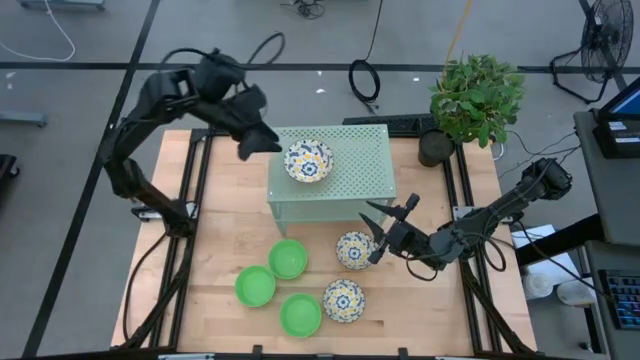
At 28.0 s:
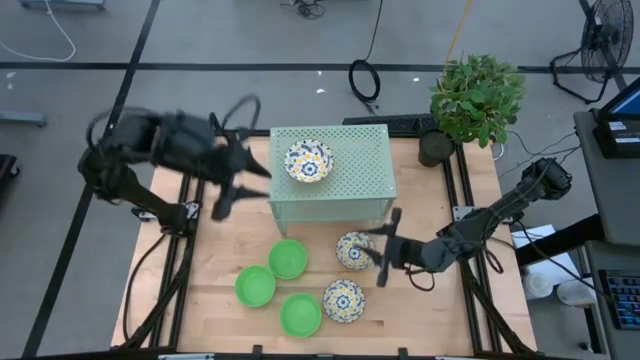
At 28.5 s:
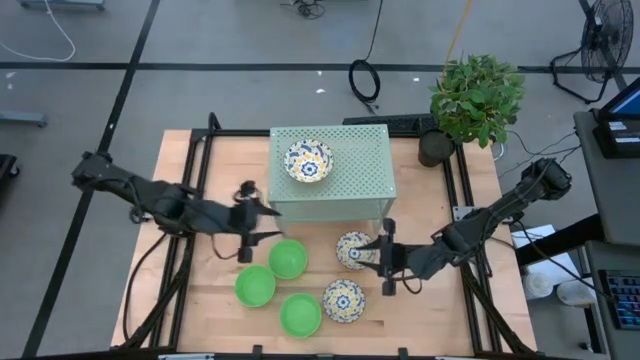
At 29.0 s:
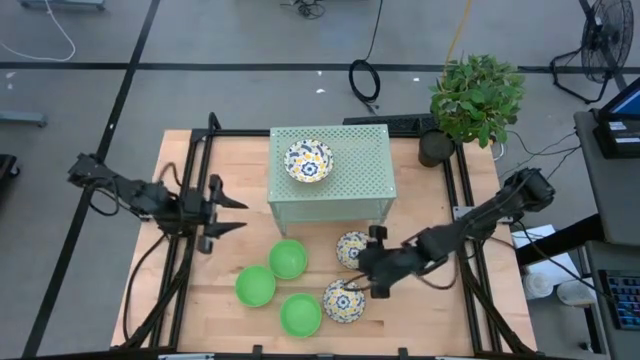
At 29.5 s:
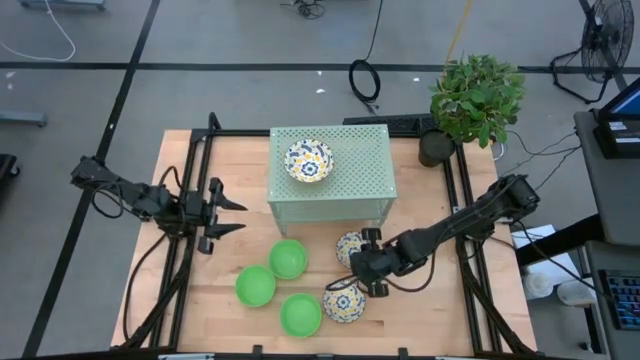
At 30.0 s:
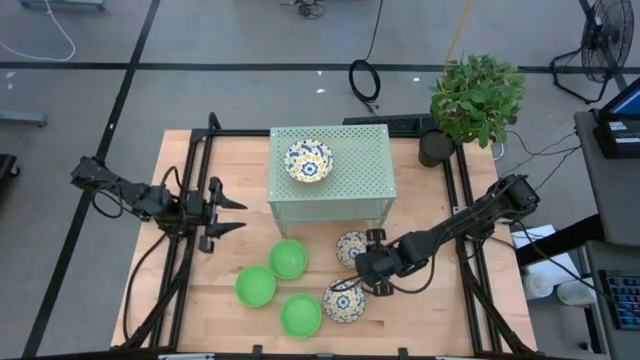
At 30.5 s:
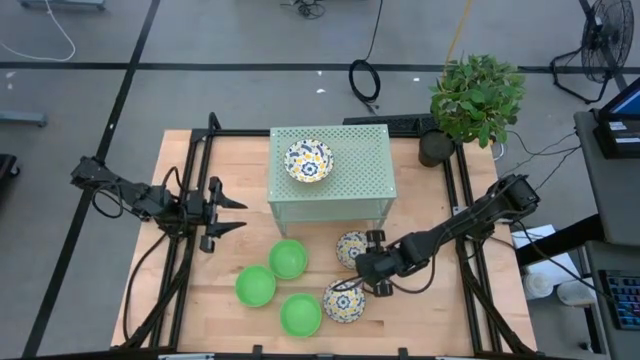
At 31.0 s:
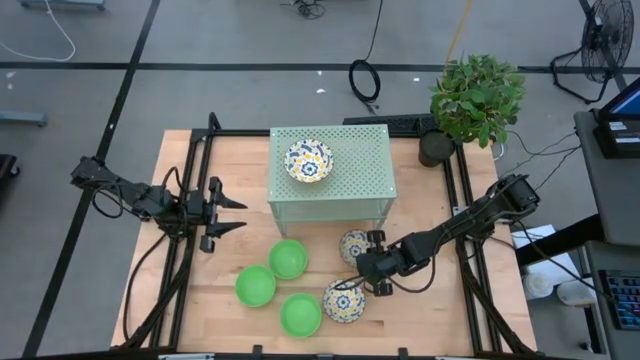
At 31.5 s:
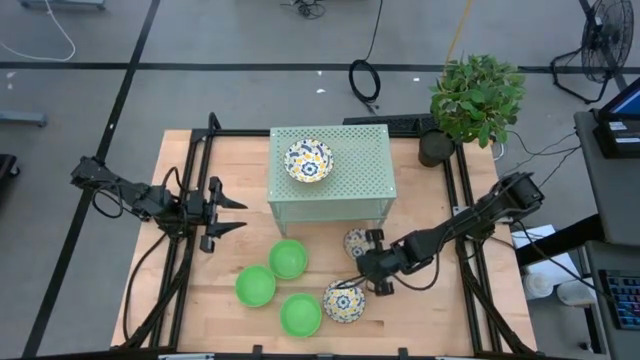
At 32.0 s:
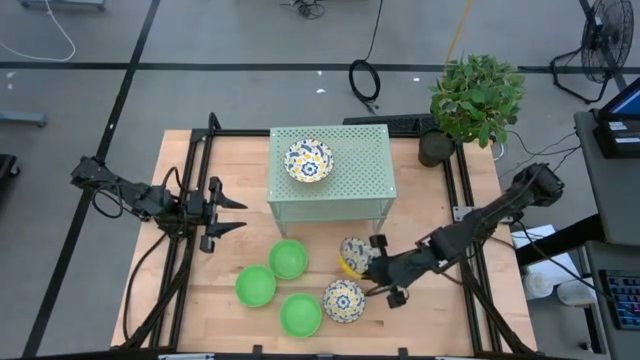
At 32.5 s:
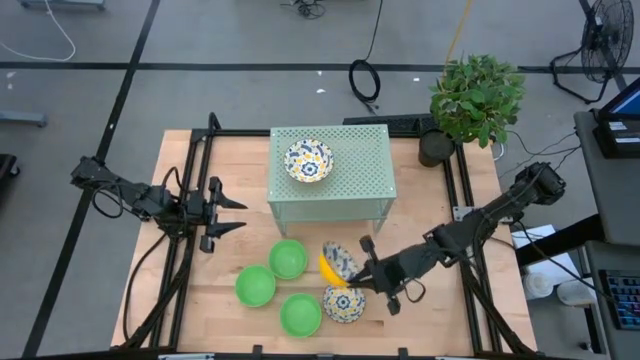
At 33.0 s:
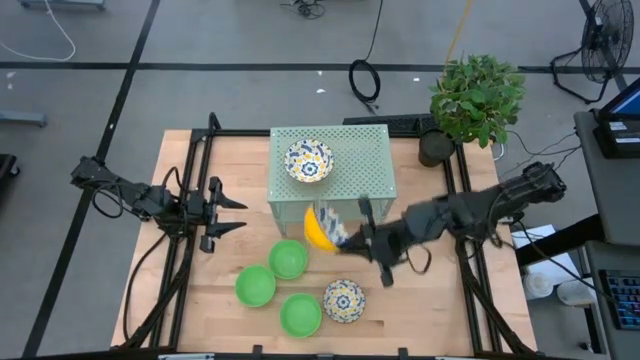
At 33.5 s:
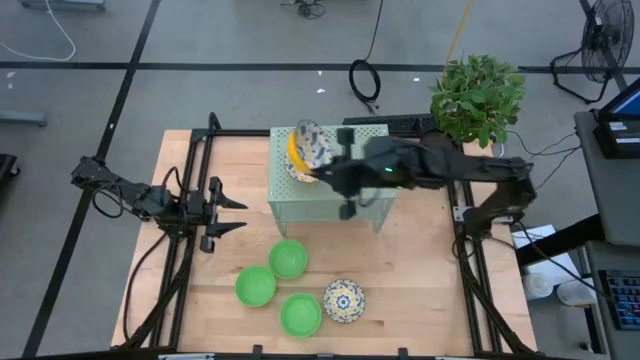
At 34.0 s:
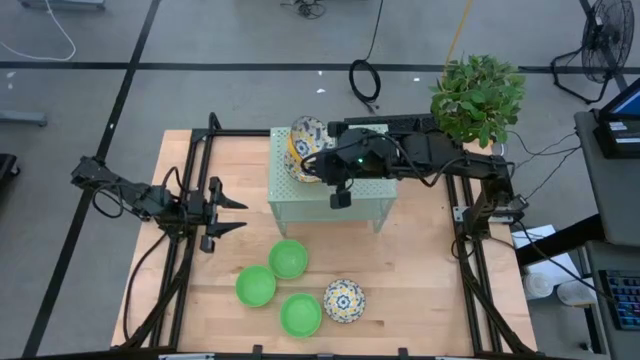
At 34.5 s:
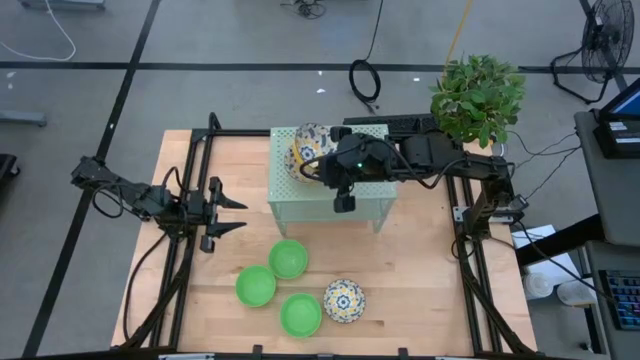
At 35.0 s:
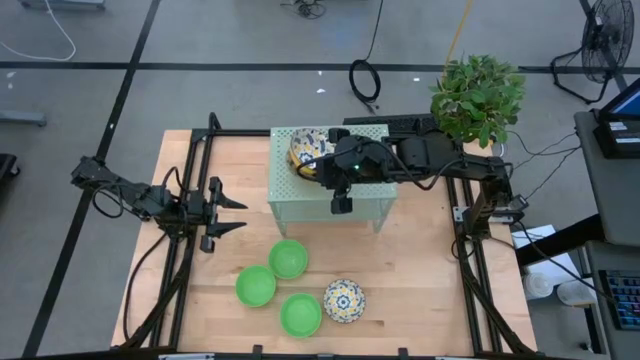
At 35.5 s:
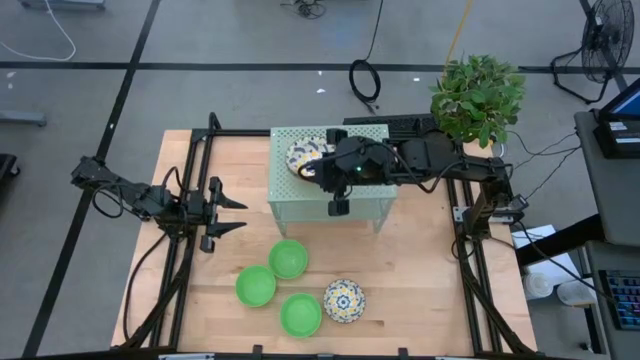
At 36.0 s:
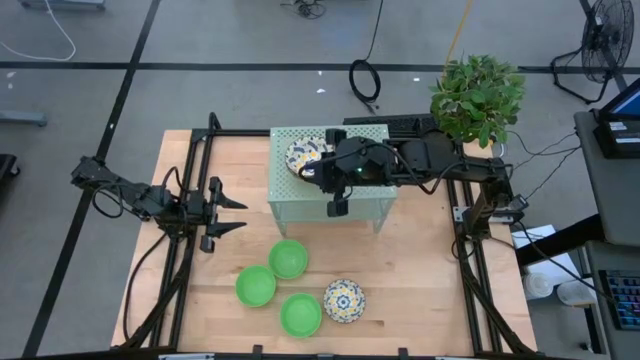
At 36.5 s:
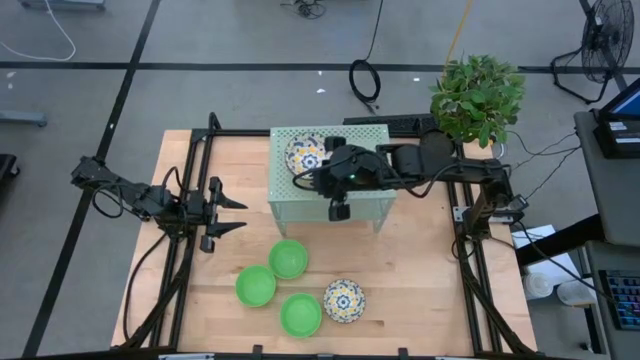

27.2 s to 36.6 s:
Task: Pick & Place Mini bowls
Stack the top yellow patterned bowl on the yellow patterned bowl on the shelf

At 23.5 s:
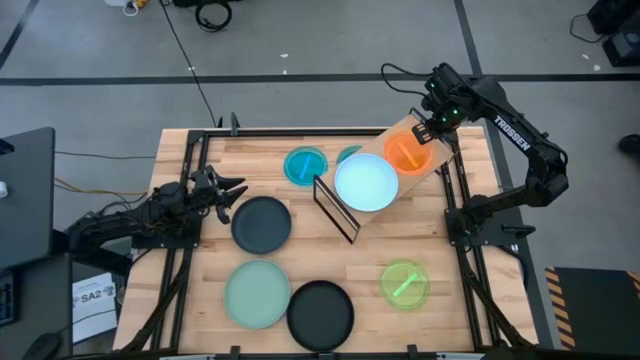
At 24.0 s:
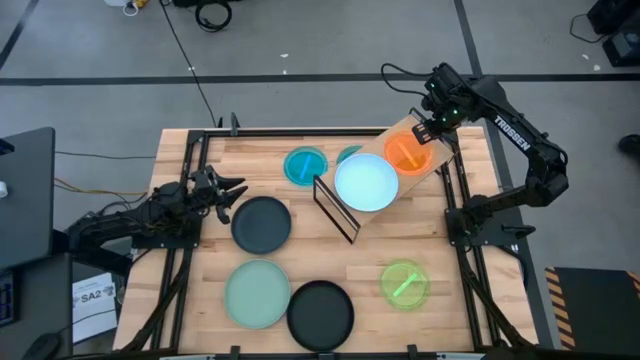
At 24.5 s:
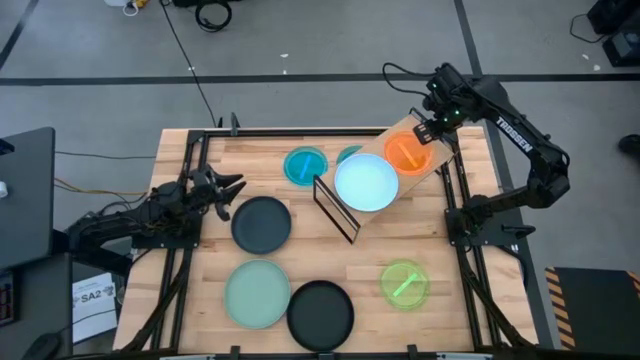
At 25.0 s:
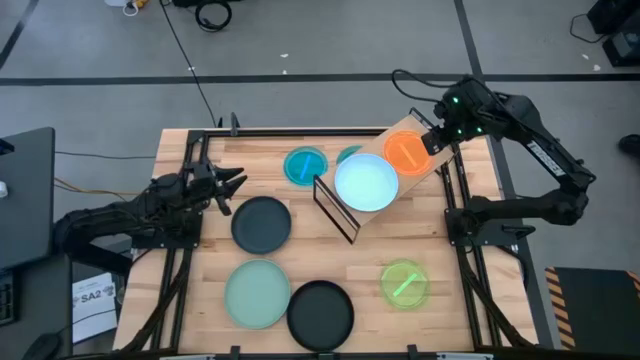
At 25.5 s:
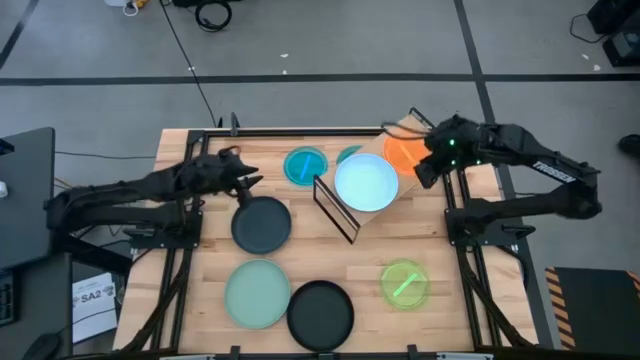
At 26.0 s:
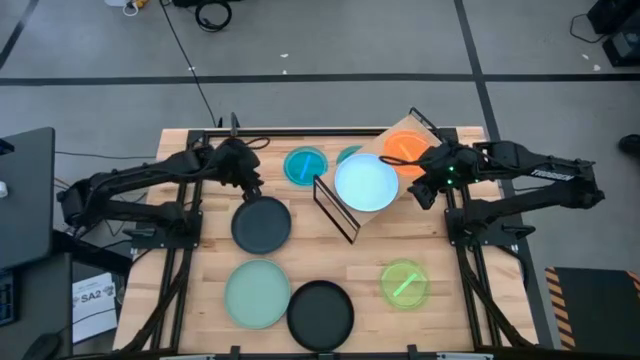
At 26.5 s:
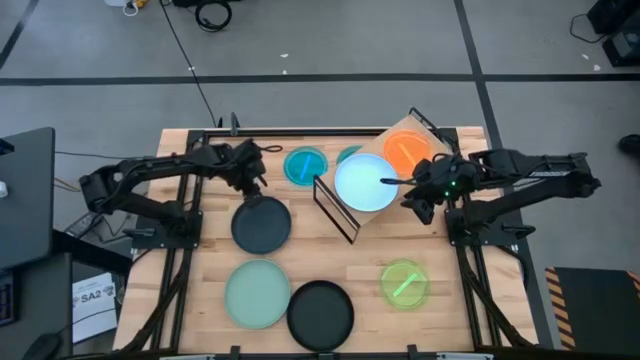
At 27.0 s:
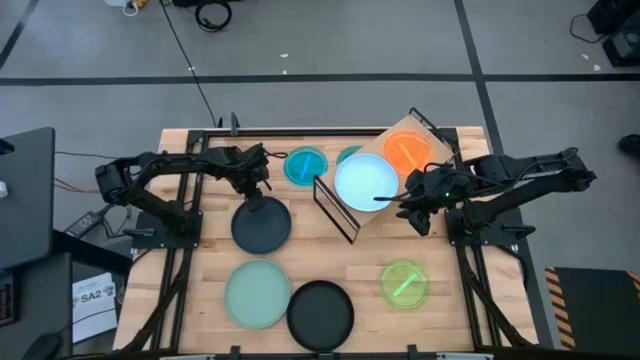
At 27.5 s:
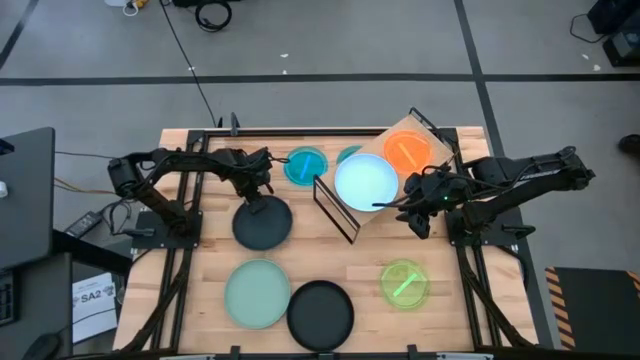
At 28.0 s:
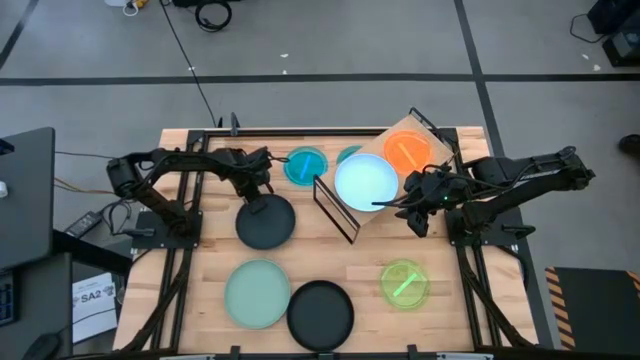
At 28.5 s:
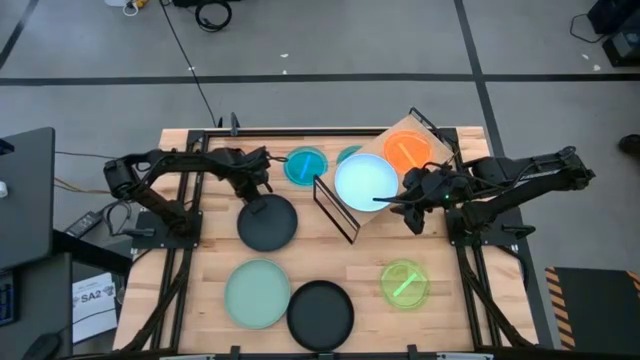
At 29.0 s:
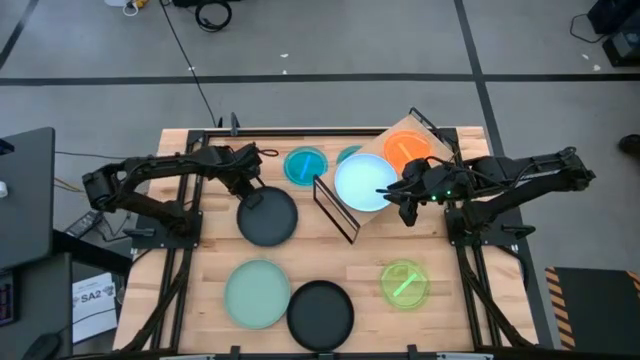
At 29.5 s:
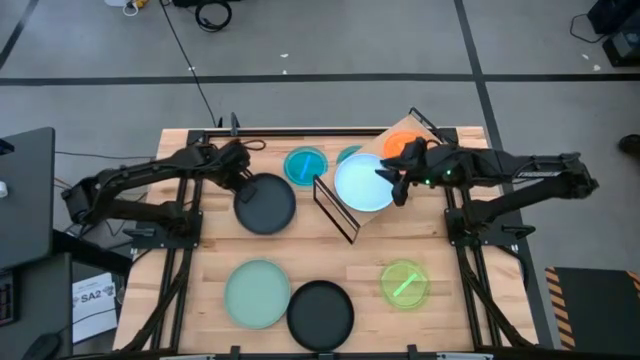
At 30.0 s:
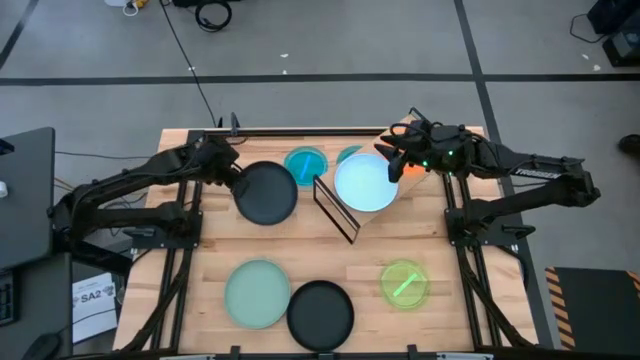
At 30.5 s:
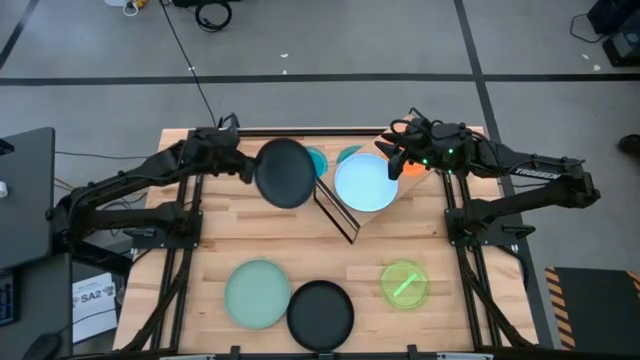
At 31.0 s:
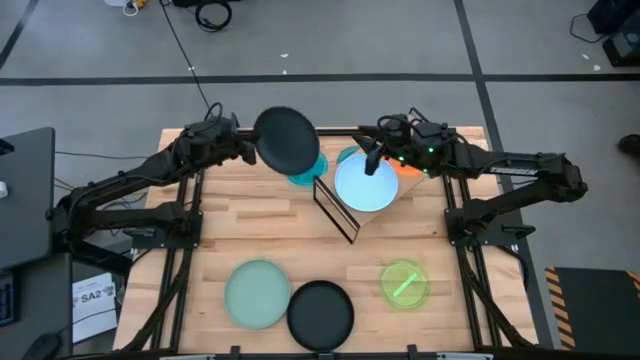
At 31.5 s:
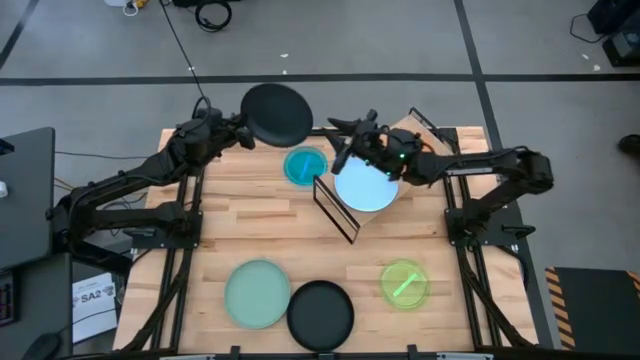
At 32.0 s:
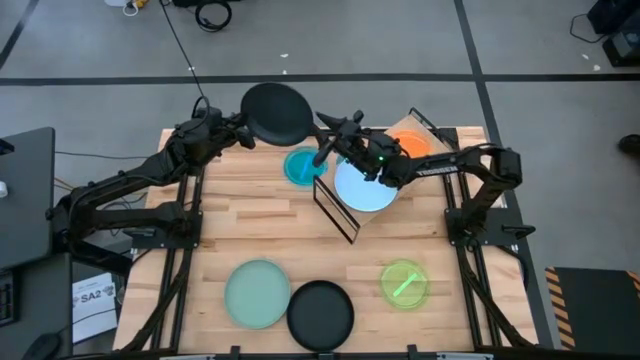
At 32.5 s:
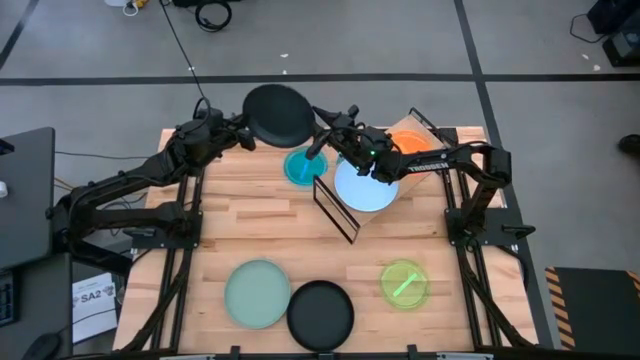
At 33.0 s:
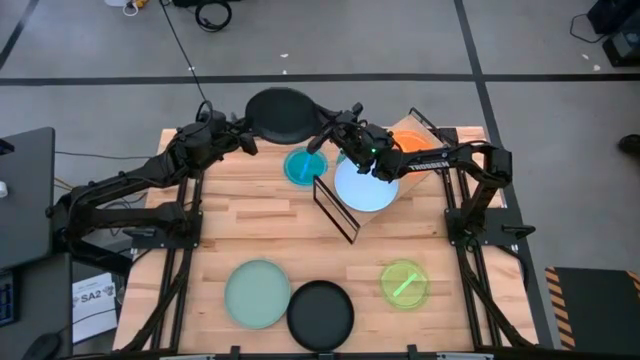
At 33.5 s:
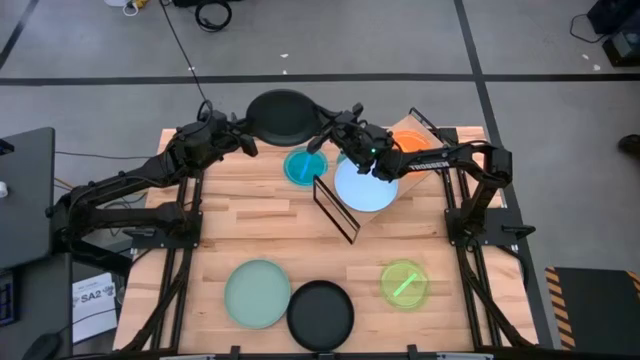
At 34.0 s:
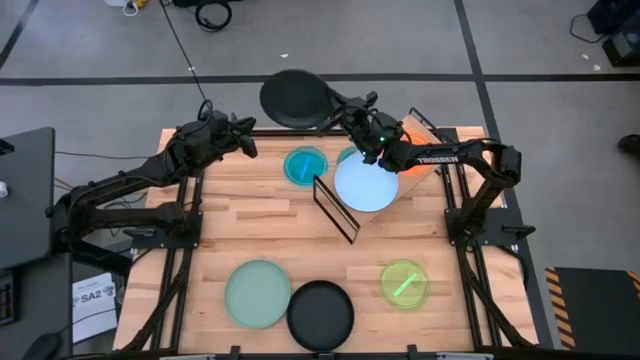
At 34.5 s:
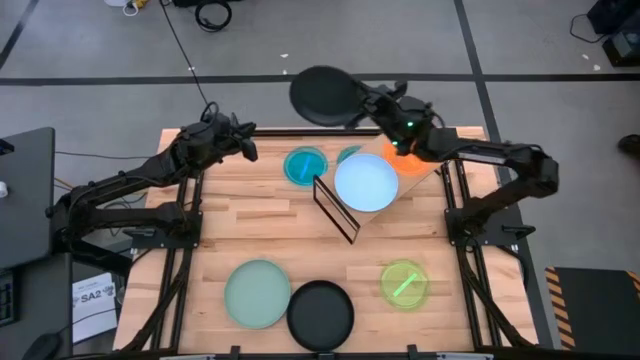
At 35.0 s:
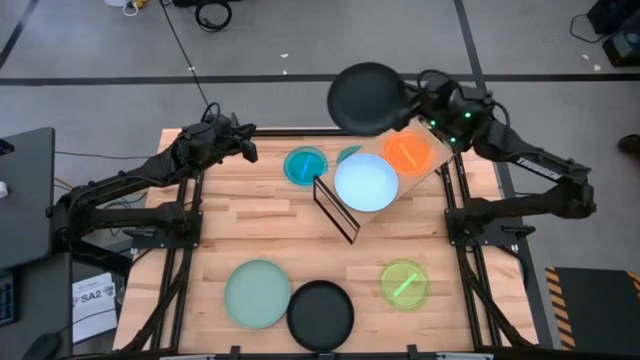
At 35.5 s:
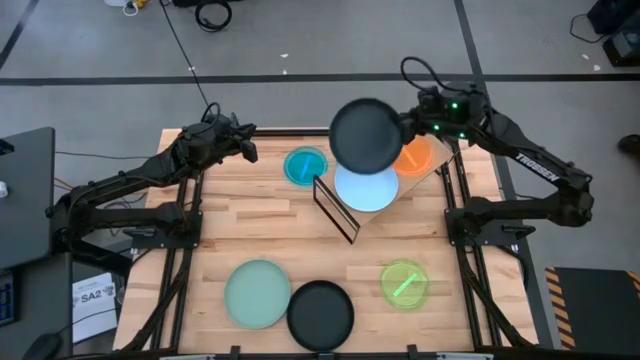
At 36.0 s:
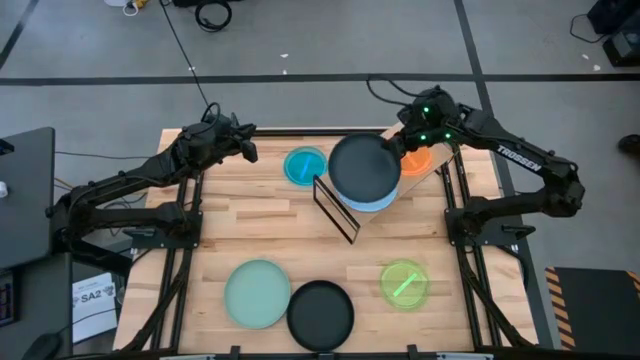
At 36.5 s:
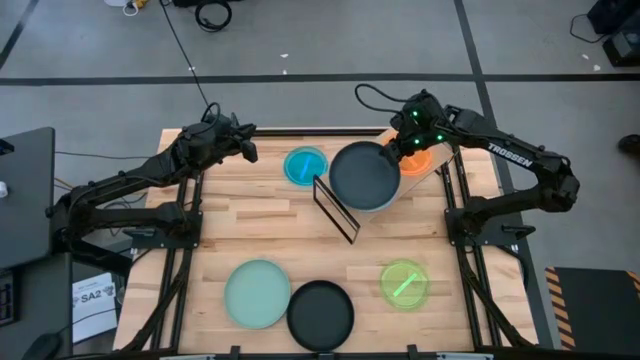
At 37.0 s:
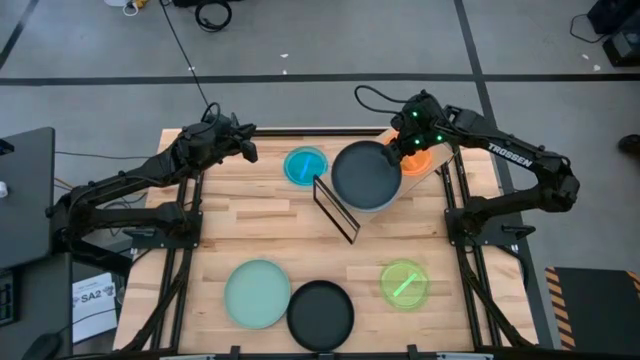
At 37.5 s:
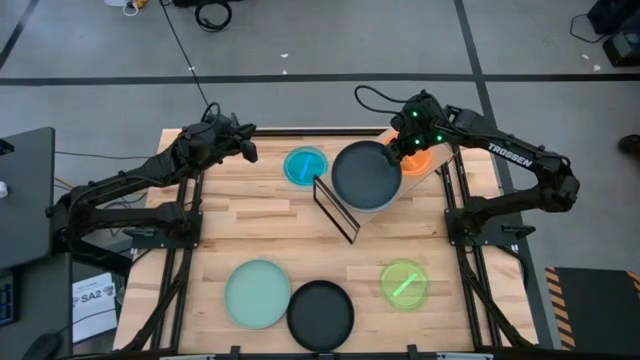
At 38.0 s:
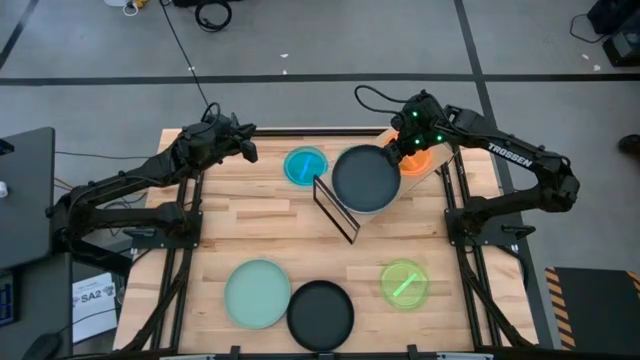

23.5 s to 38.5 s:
Task: Place and stack plates onto a shelf
Stack the top big black plate on top of the big light blue plate on the shelf
